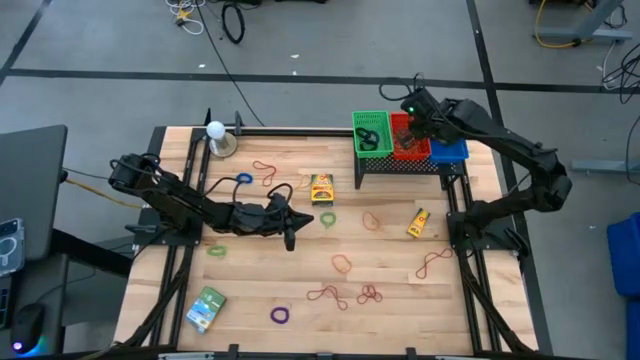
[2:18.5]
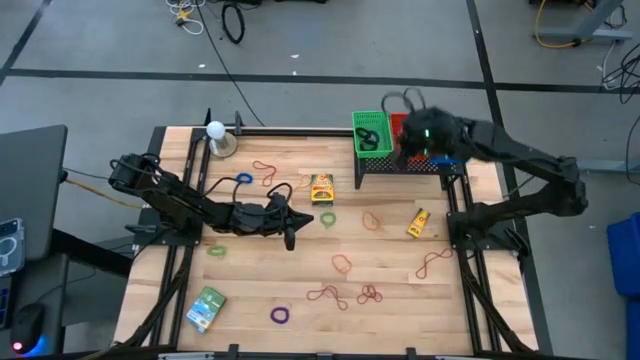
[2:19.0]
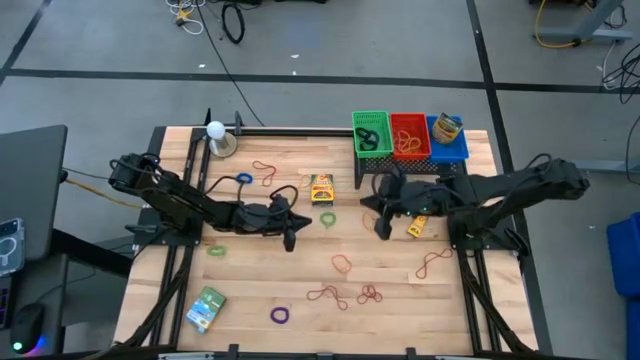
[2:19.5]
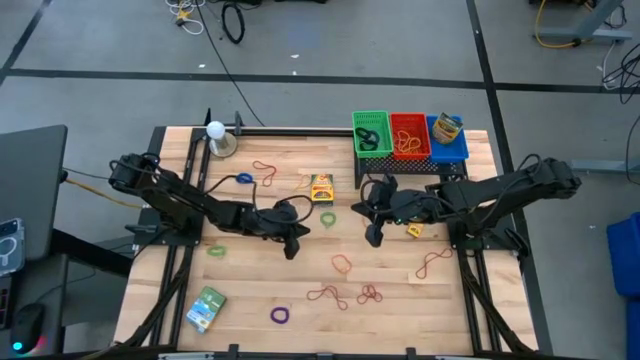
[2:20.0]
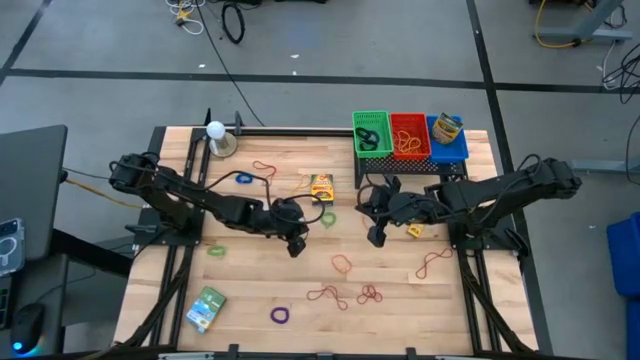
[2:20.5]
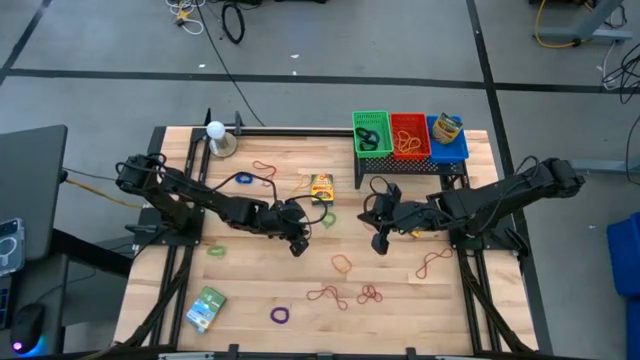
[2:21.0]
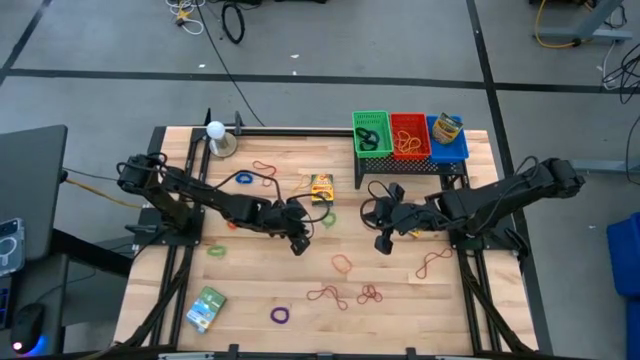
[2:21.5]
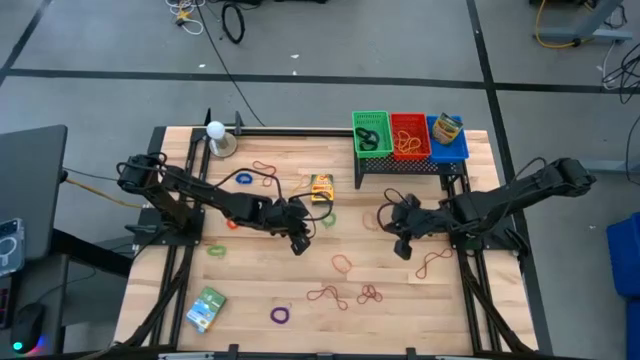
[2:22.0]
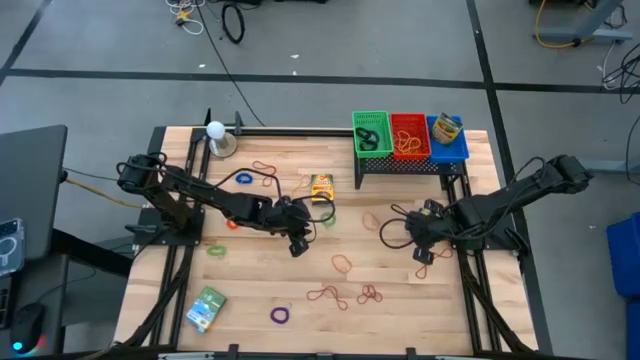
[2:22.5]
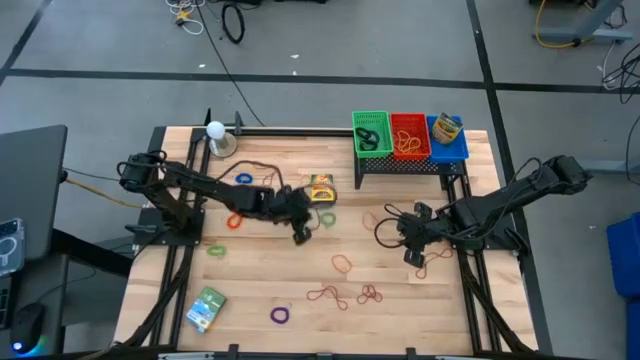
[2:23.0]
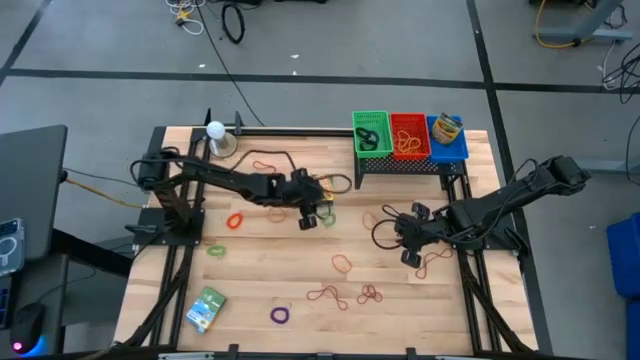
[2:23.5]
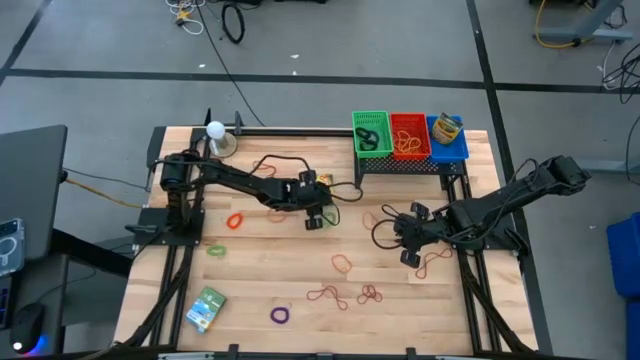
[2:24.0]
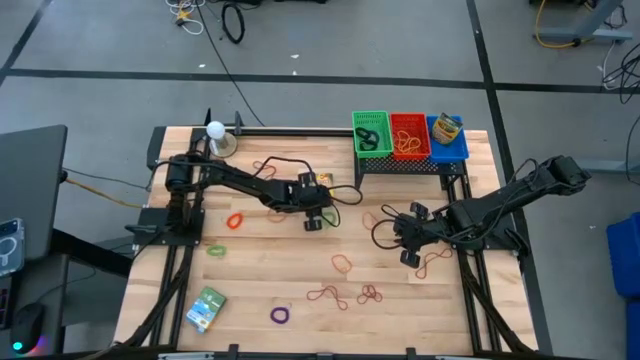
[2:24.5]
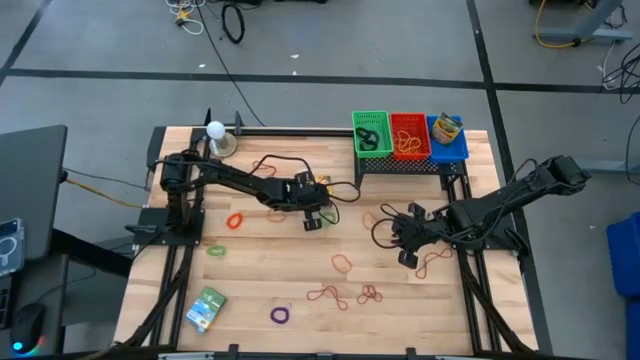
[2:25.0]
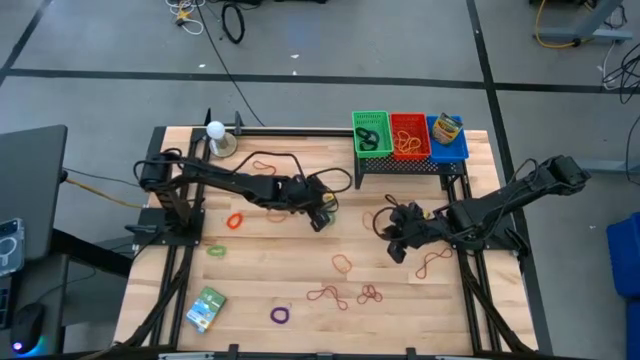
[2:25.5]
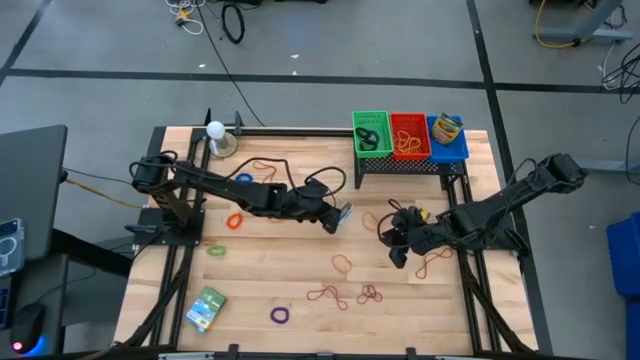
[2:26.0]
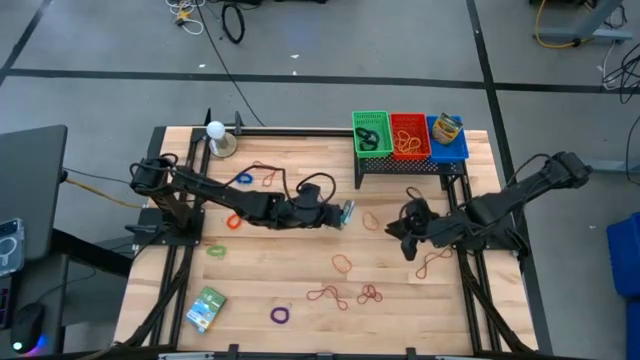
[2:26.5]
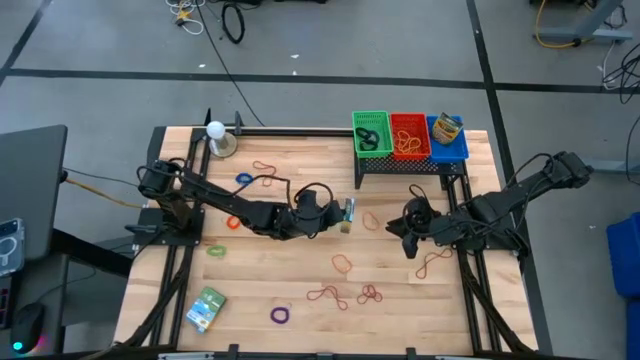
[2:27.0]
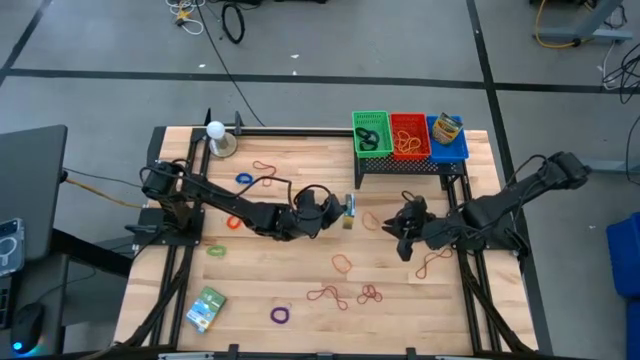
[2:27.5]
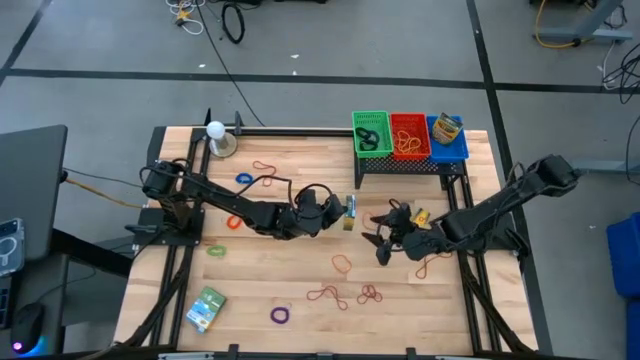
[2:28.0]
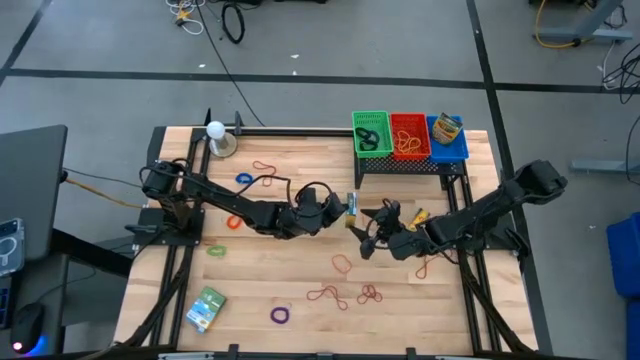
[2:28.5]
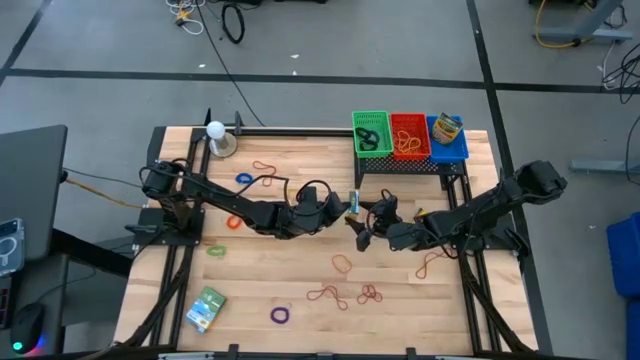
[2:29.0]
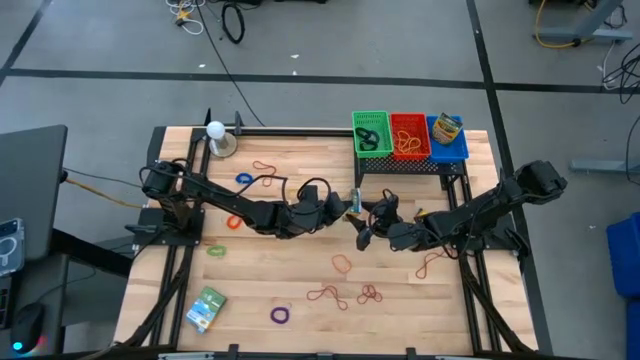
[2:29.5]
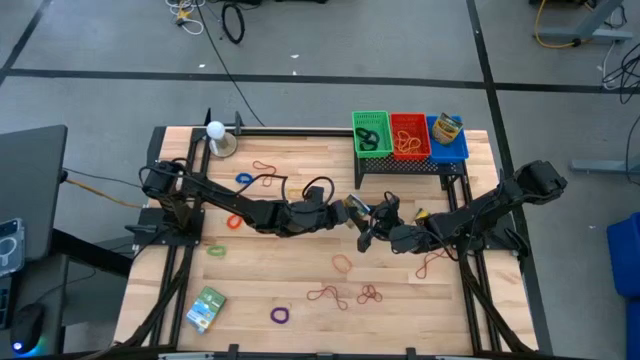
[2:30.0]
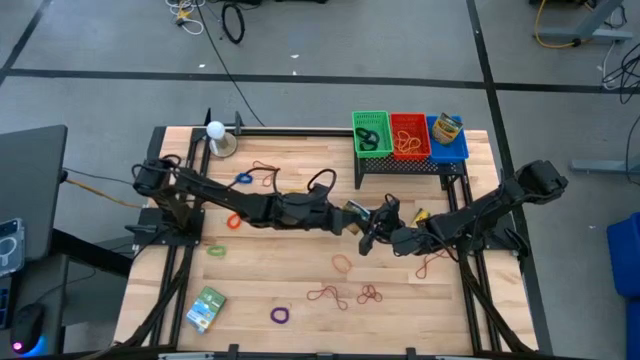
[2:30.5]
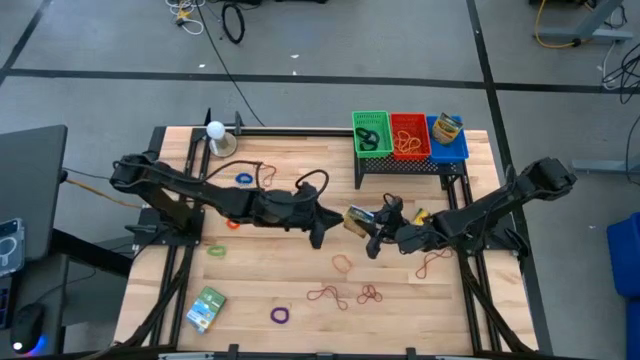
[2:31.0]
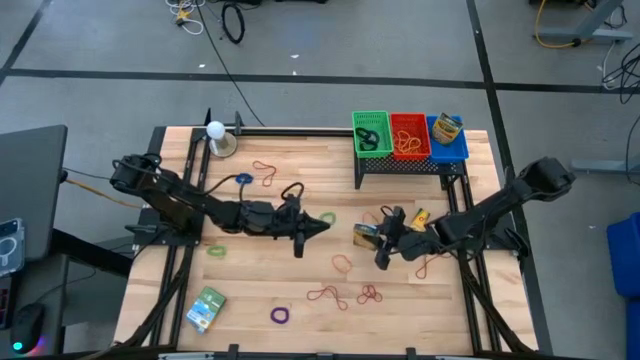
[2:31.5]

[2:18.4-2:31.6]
Task: Pick & Place Office Desk Supplies
Put the large crayon box into the blue bin

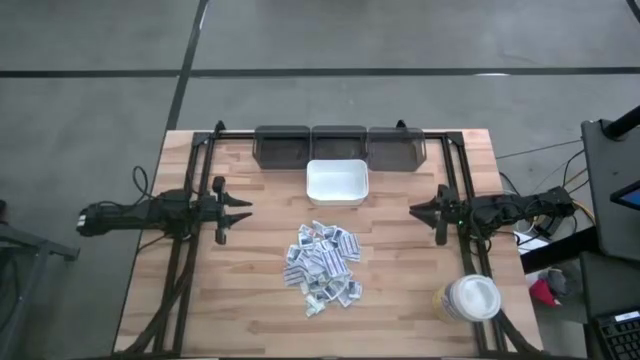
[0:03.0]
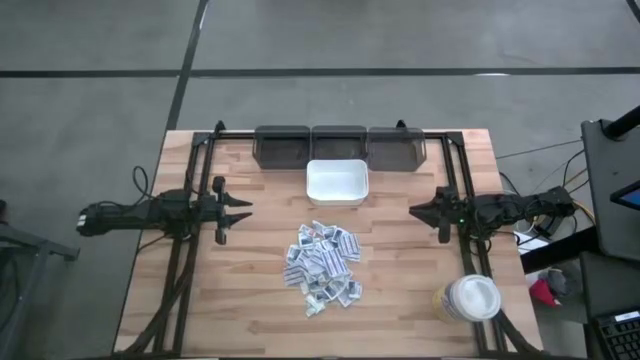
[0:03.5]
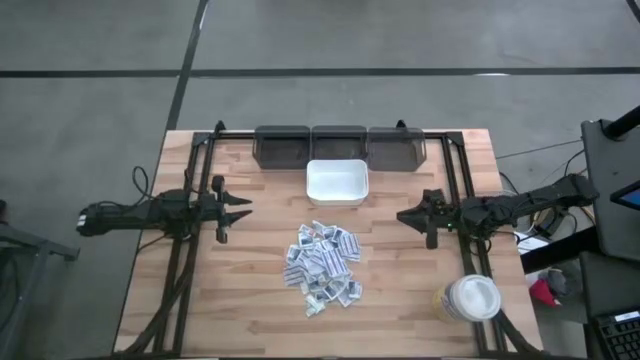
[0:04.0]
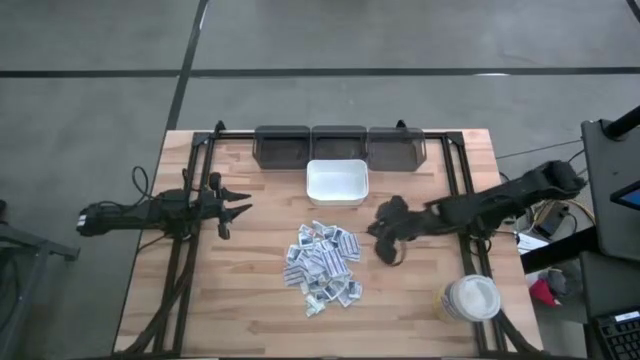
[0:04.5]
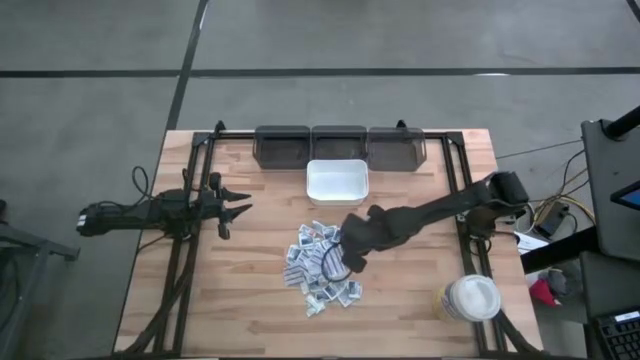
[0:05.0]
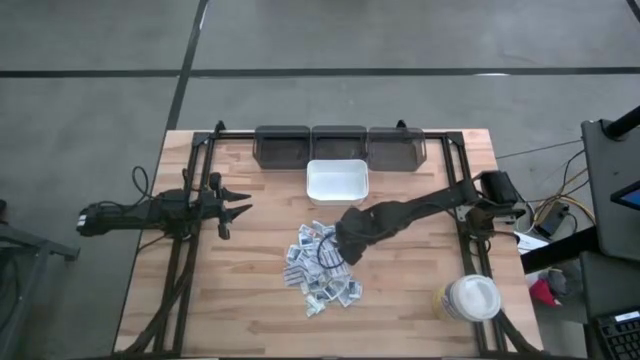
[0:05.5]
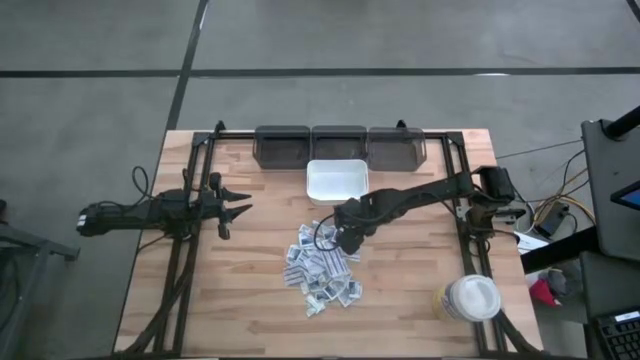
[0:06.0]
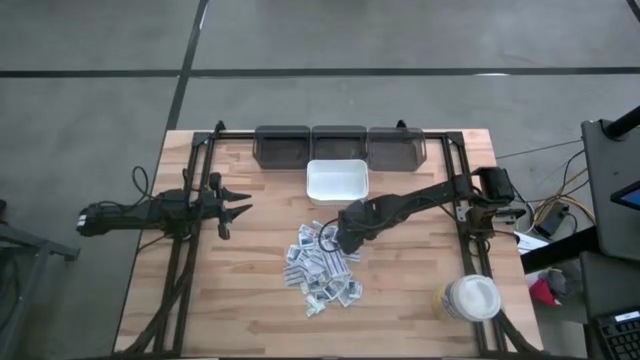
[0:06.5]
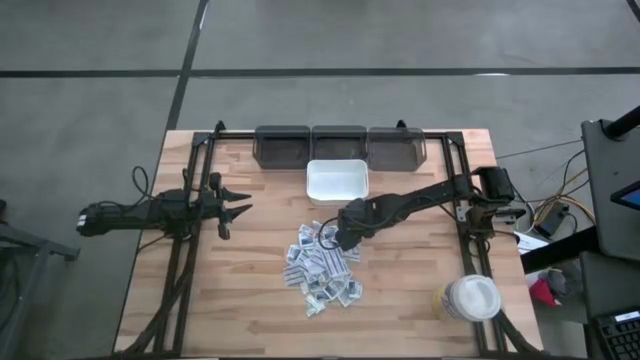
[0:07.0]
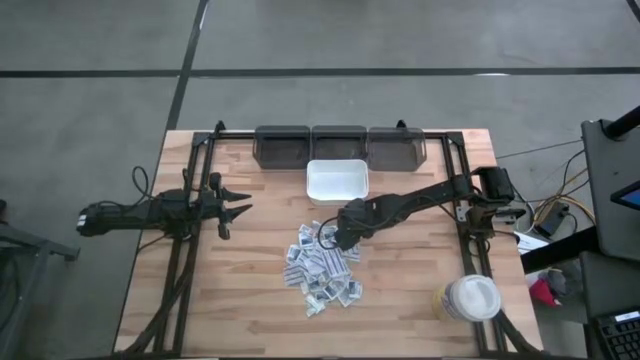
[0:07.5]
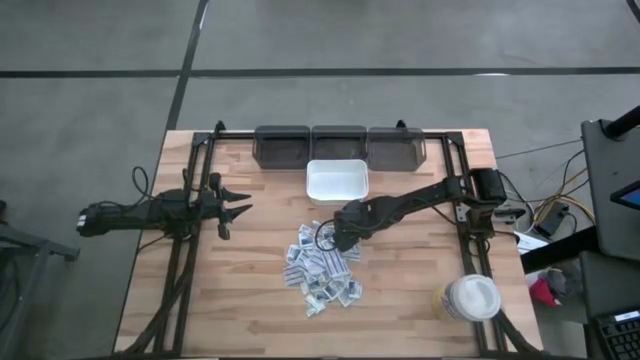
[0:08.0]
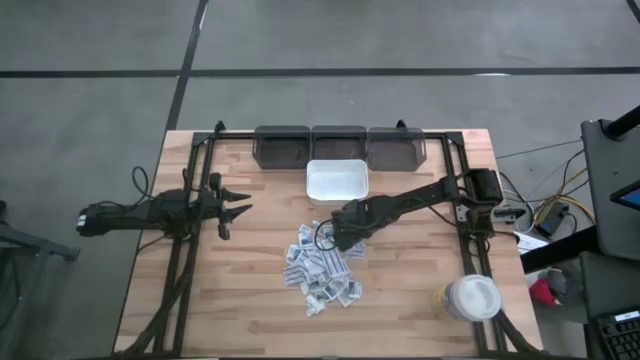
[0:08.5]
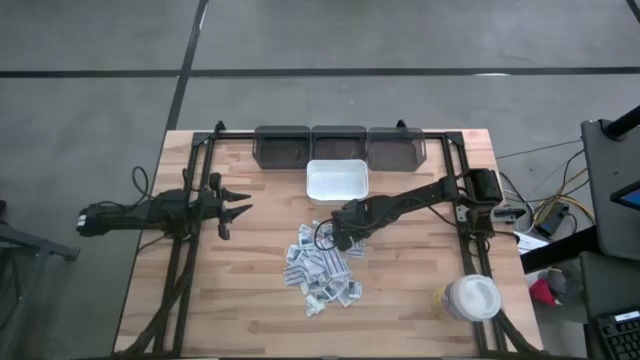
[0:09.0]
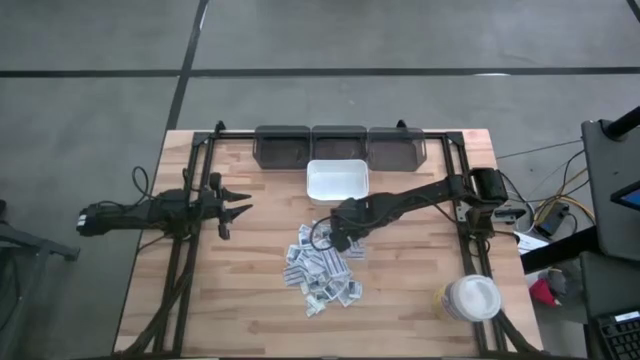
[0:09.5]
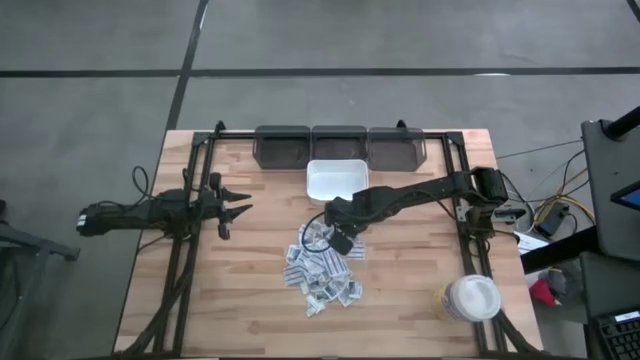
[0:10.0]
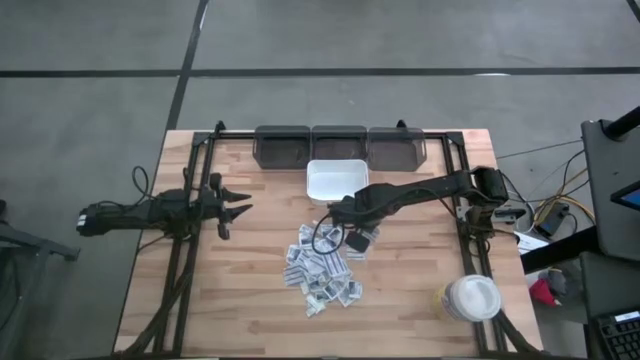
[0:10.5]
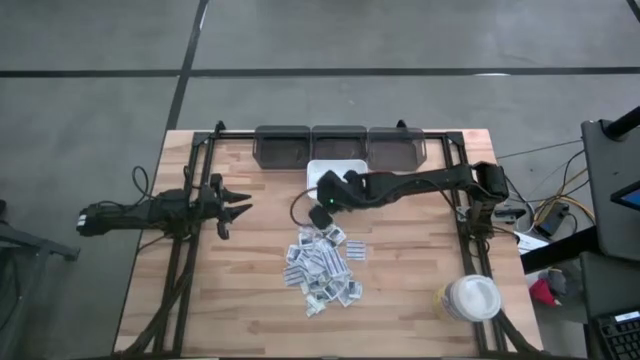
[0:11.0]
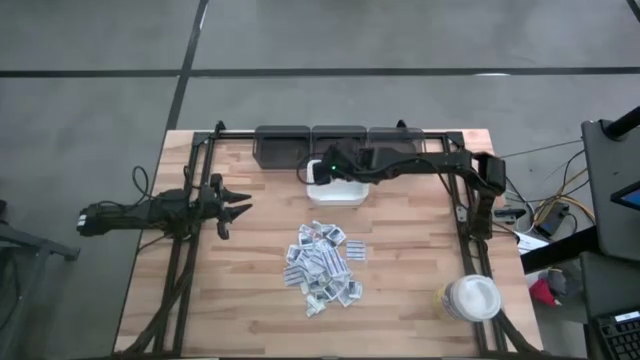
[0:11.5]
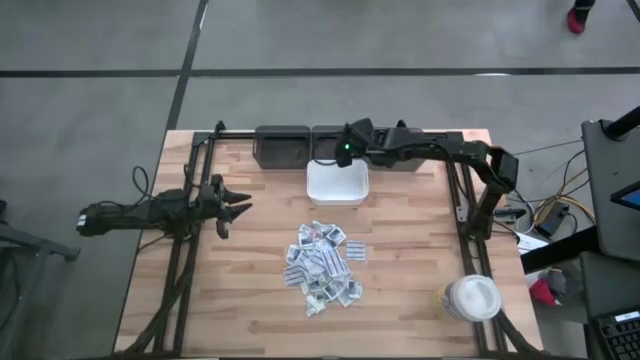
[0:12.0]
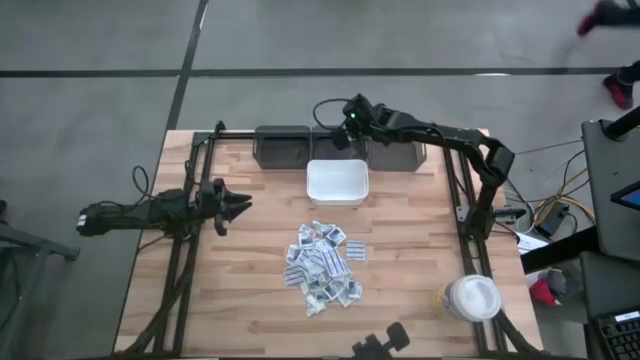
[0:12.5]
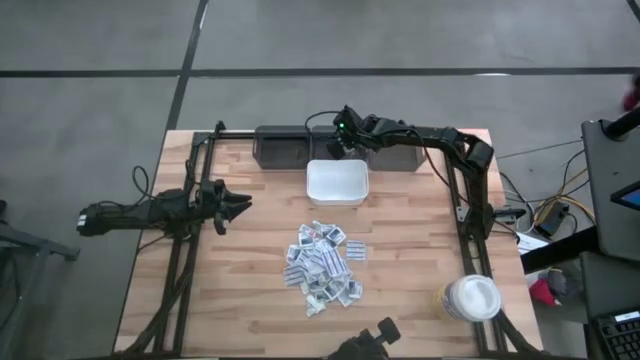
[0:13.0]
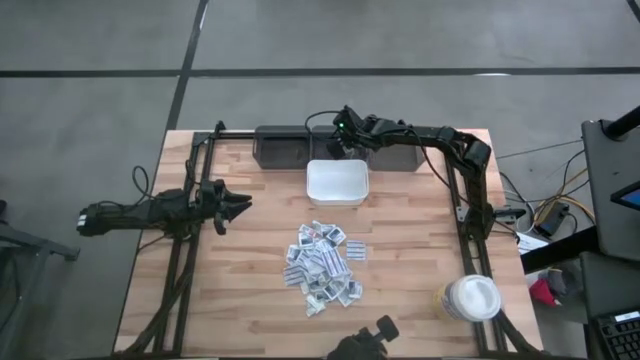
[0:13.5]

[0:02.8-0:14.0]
Task: Pick & Place First Aid Supplies
Put the blue bandage into the middle black bin
